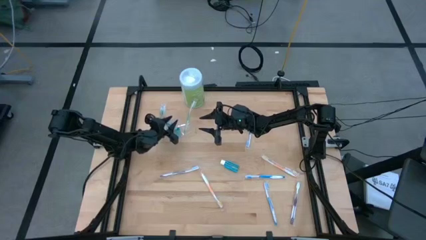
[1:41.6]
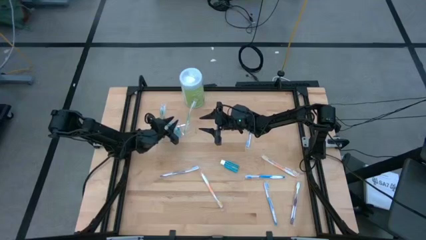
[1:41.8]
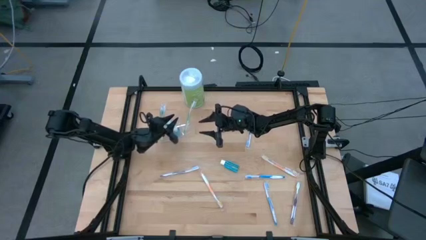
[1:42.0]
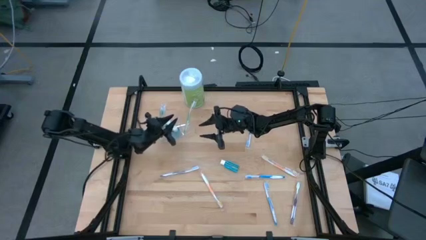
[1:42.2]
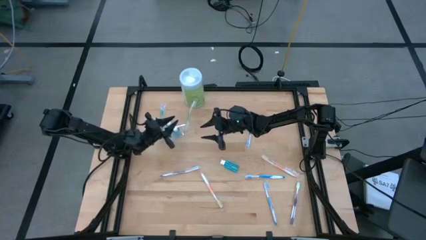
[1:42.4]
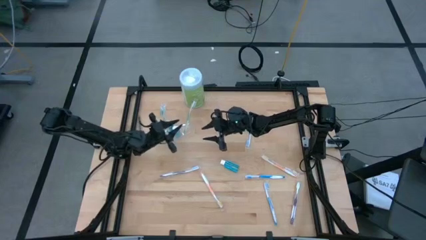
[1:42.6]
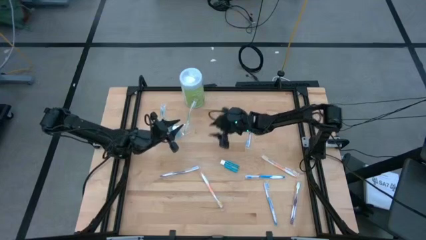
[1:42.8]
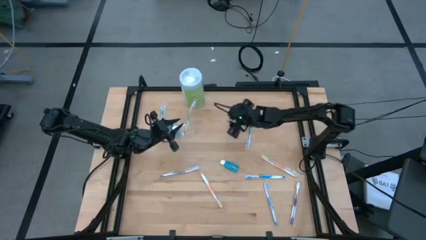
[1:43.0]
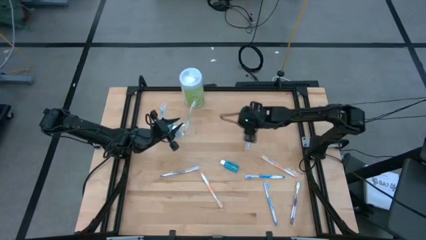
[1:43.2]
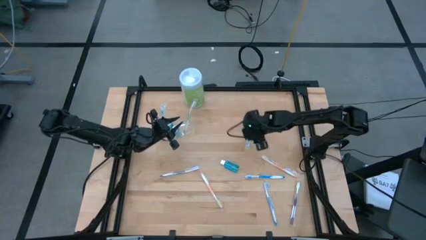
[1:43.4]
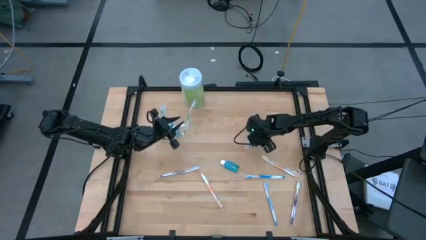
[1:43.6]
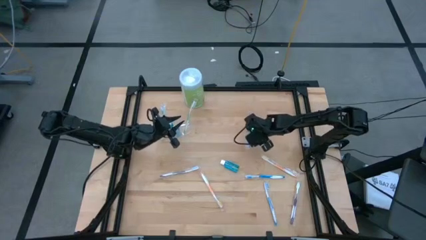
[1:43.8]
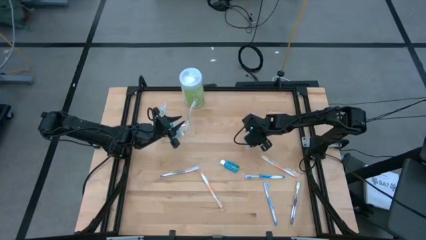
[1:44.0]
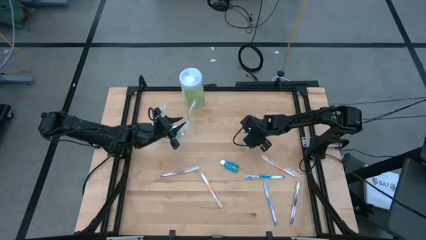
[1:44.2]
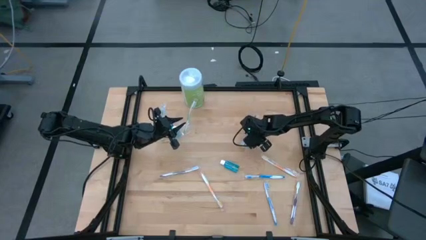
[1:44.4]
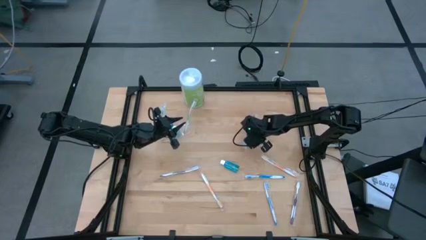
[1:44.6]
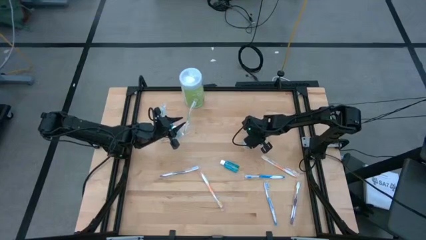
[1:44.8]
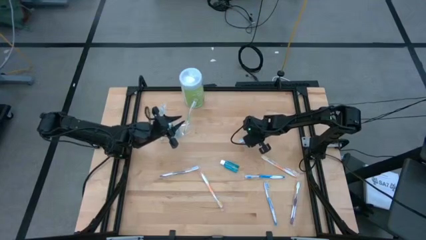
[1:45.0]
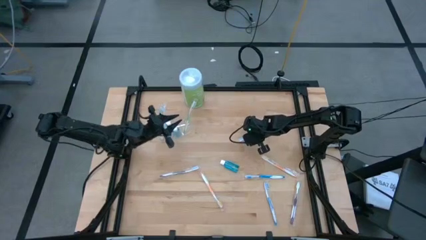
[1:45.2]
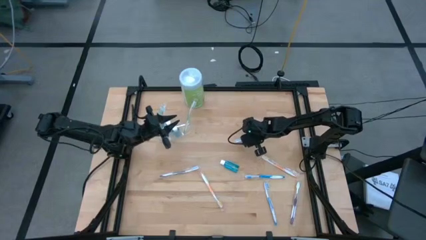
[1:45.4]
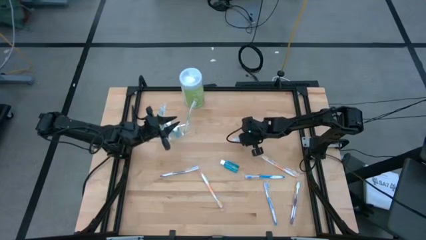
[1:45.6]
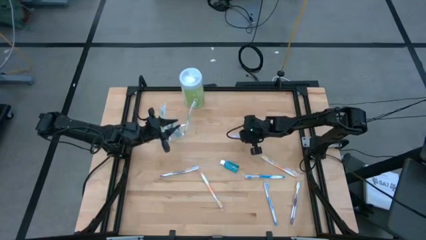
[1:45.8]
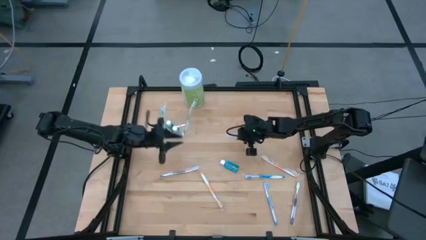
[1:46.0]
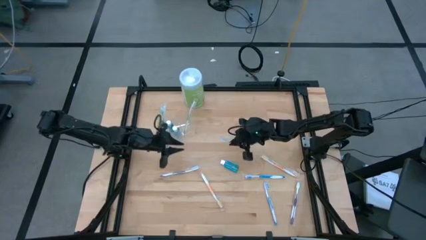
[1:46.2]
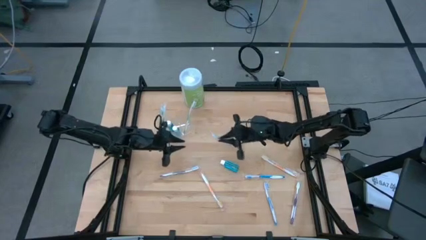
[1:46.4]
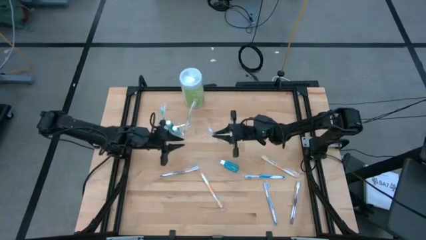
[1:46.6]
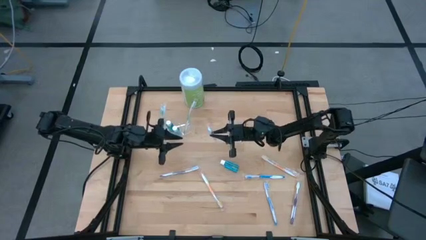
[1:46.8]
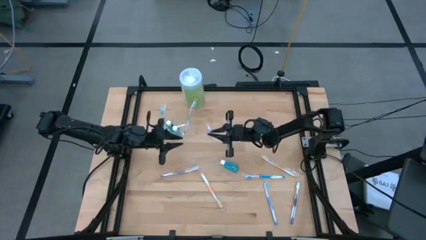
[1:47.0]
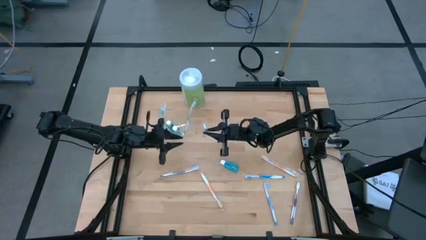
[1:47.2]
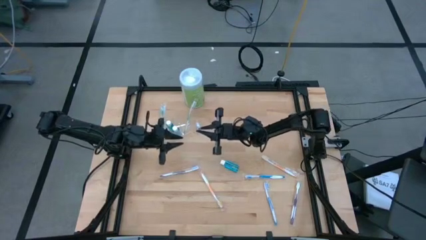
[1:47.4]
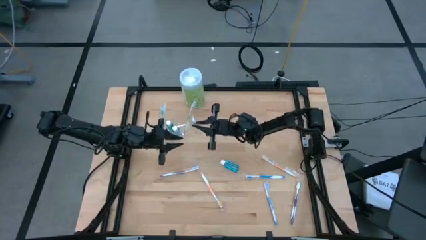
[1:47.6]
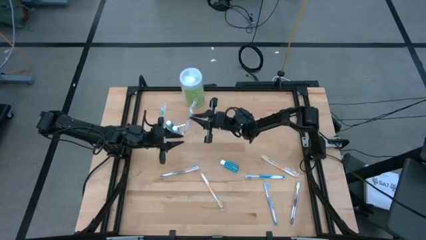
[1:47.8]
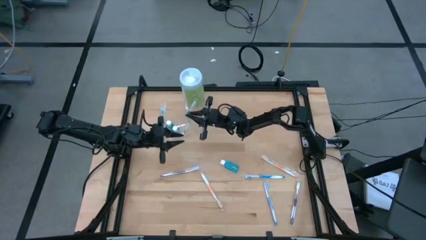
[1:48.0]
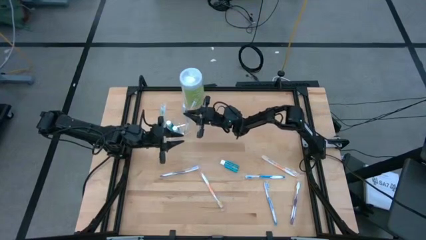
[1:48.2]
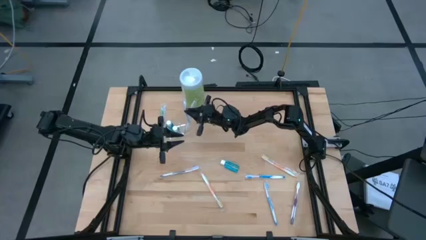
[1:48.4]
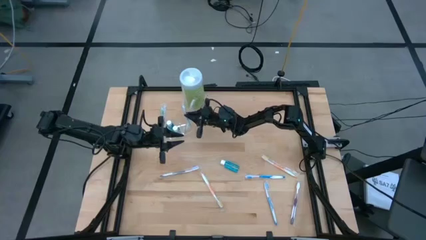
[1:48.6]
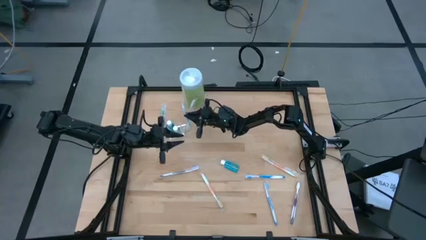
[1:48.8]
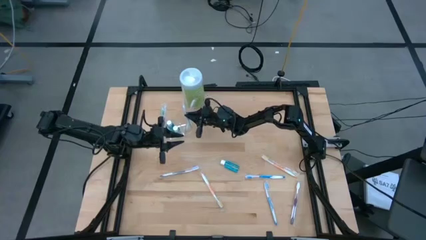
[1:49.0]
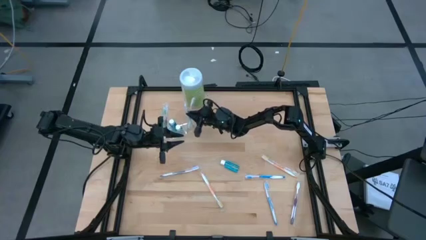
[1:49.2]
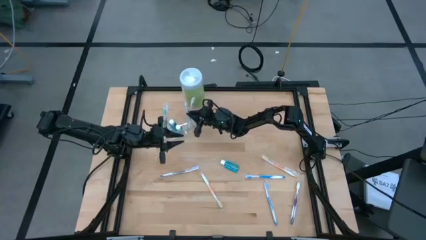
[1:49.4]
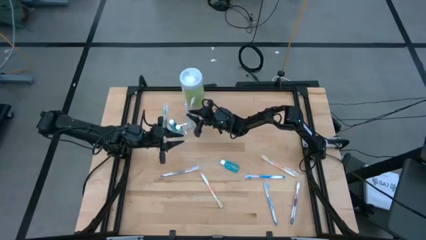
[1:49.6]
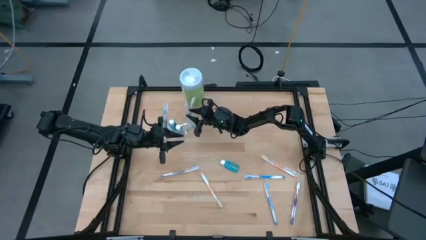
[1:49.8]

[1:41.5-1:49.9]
Task: Pick & Place toothbrushing station
Put the top blue toothbrush into the transparent organizer

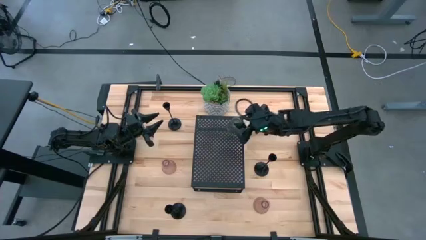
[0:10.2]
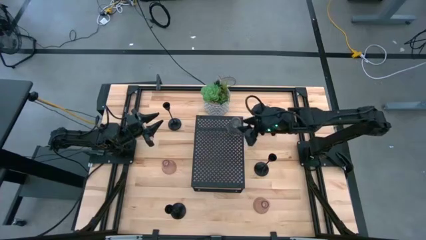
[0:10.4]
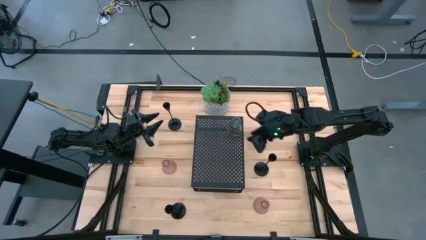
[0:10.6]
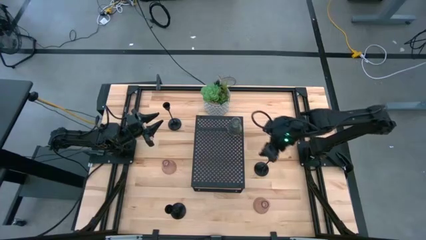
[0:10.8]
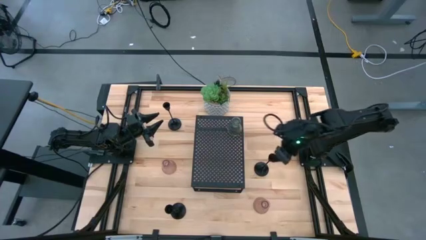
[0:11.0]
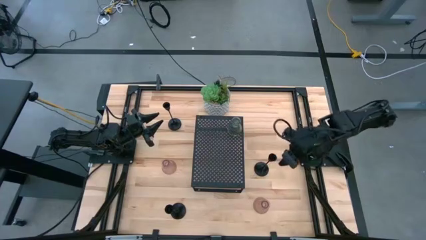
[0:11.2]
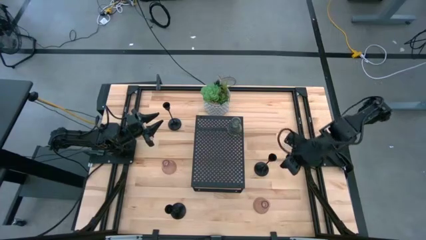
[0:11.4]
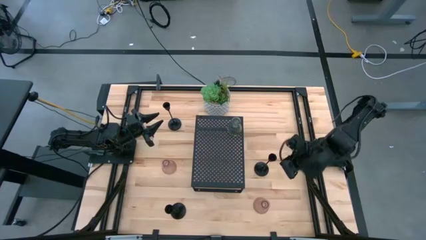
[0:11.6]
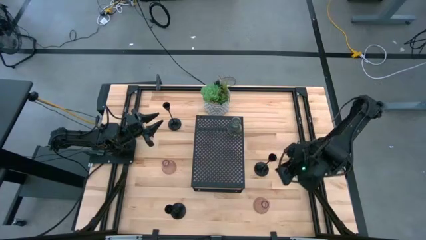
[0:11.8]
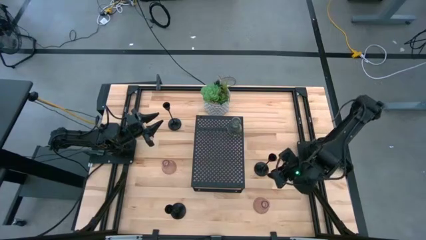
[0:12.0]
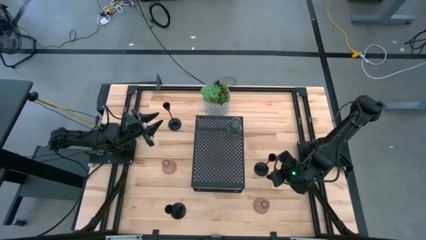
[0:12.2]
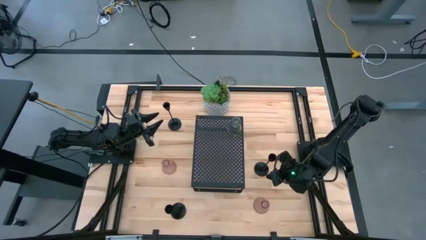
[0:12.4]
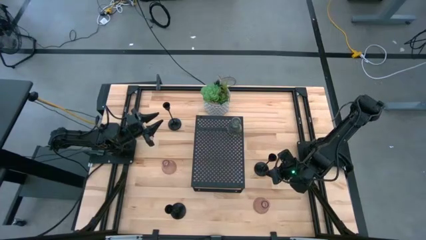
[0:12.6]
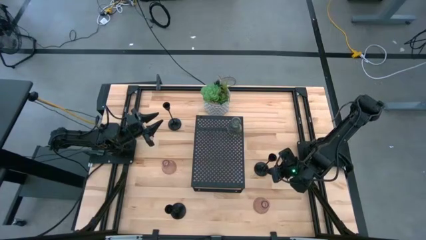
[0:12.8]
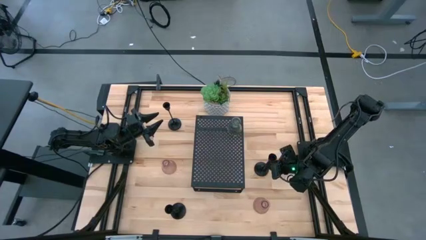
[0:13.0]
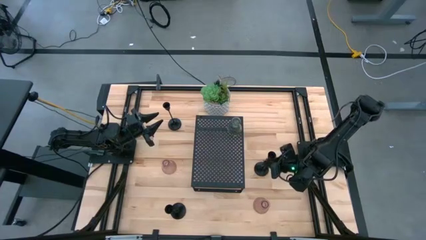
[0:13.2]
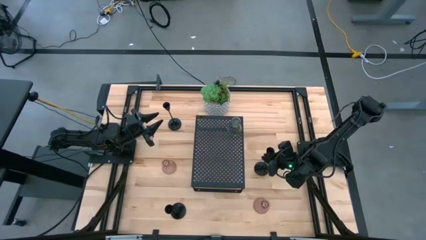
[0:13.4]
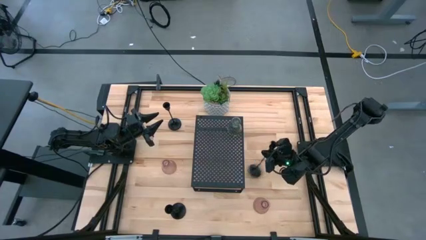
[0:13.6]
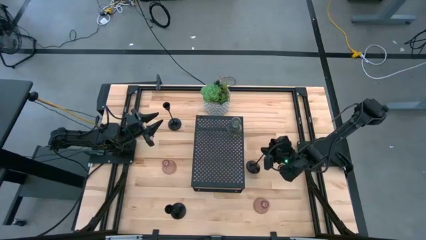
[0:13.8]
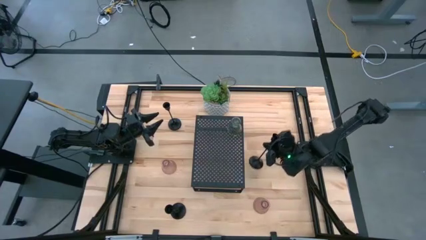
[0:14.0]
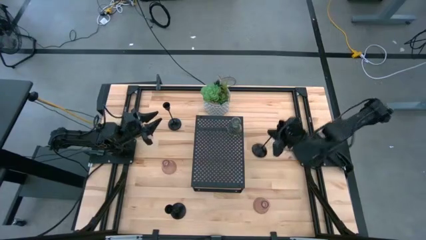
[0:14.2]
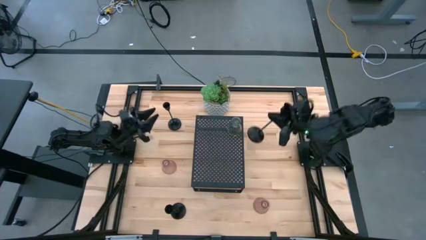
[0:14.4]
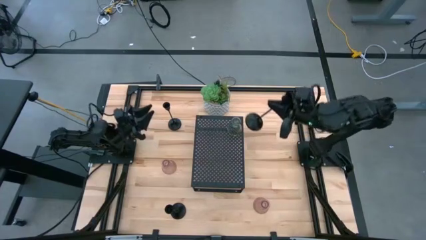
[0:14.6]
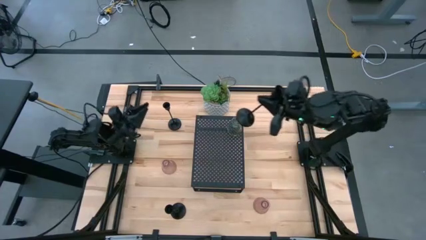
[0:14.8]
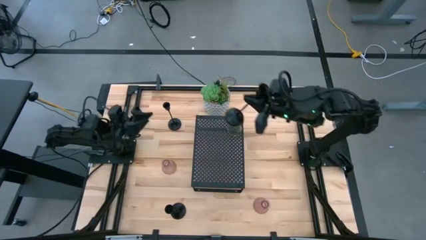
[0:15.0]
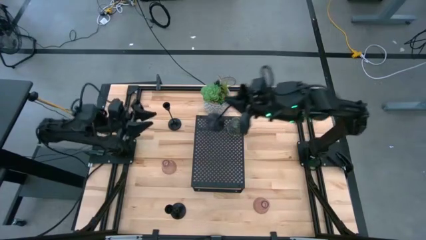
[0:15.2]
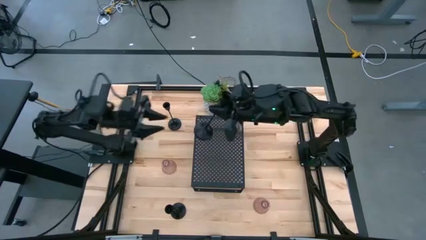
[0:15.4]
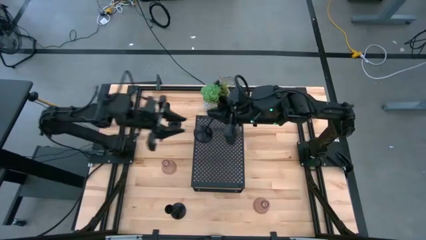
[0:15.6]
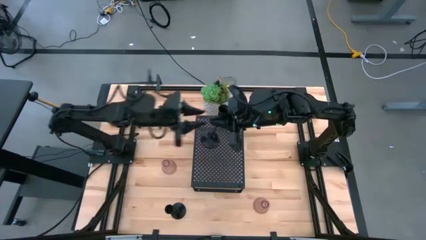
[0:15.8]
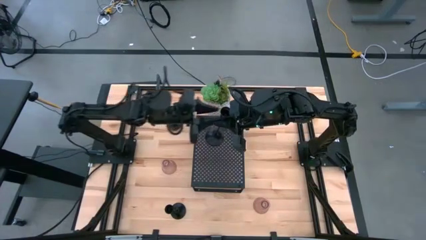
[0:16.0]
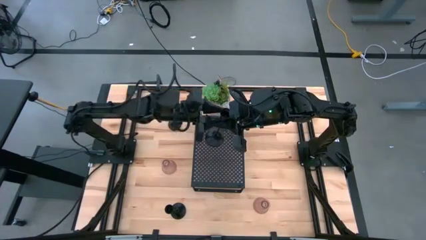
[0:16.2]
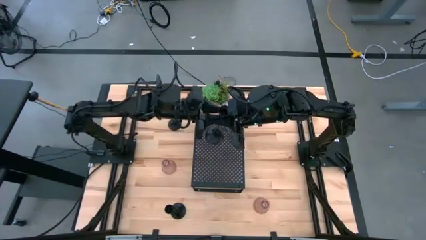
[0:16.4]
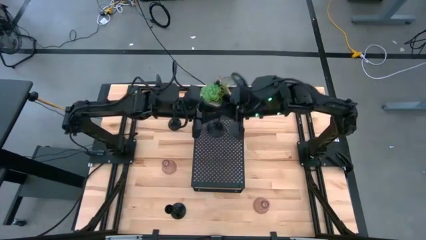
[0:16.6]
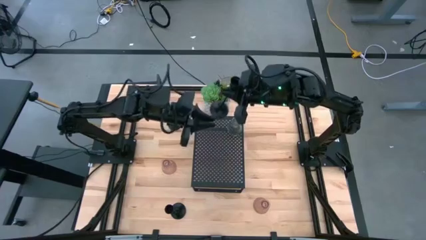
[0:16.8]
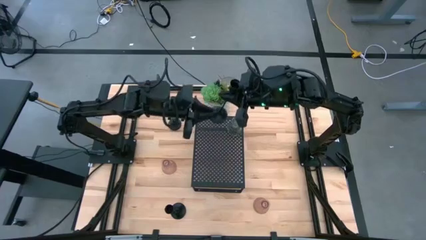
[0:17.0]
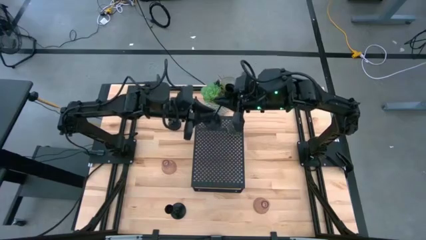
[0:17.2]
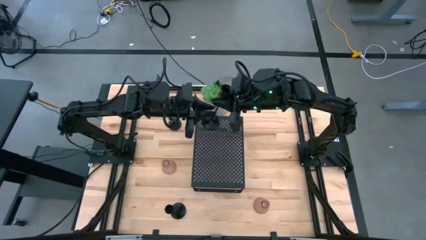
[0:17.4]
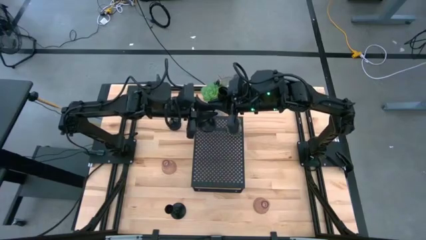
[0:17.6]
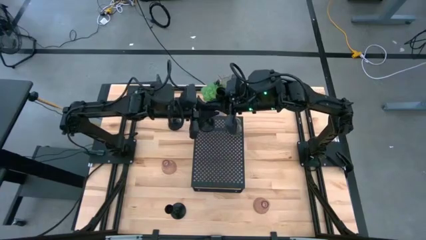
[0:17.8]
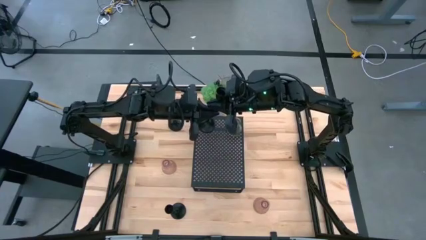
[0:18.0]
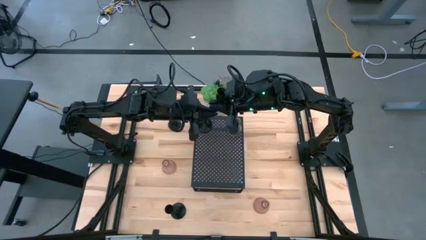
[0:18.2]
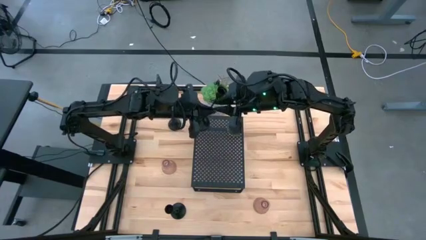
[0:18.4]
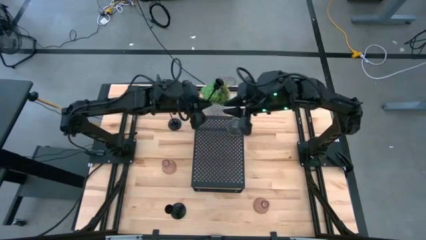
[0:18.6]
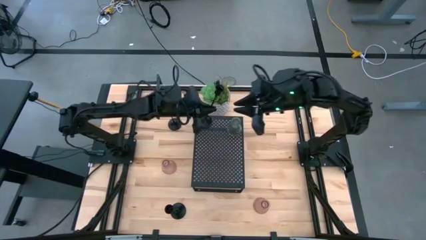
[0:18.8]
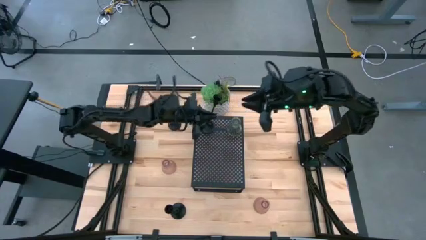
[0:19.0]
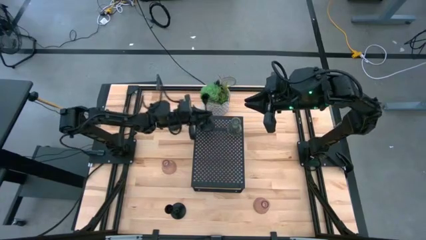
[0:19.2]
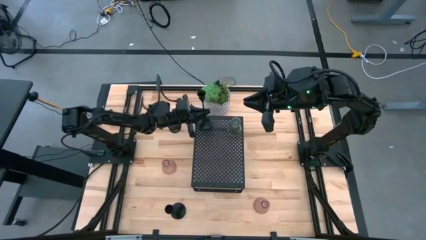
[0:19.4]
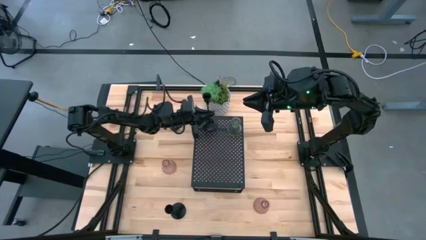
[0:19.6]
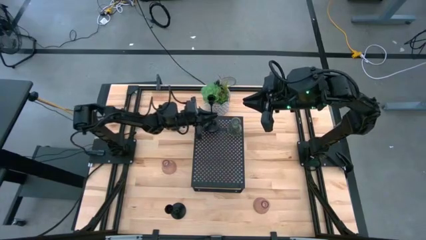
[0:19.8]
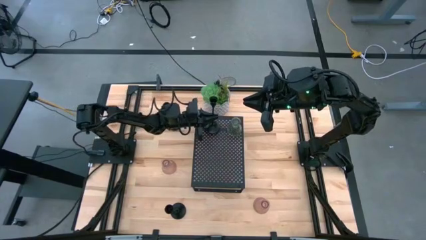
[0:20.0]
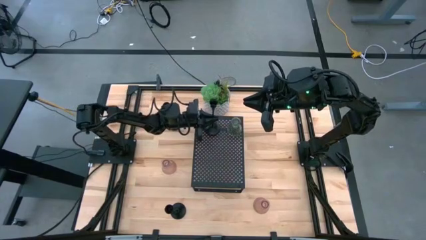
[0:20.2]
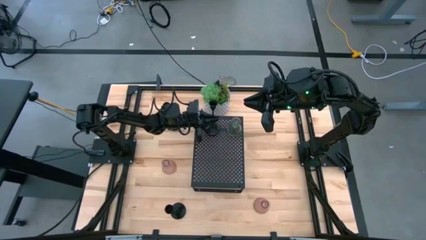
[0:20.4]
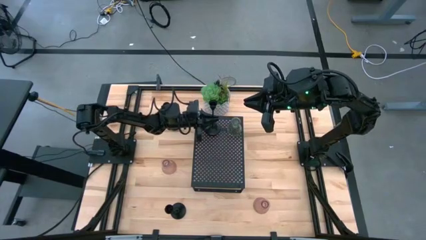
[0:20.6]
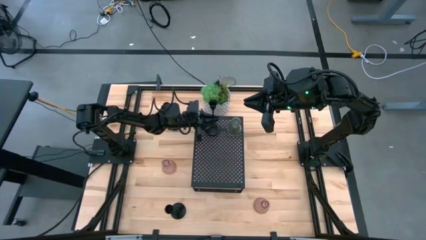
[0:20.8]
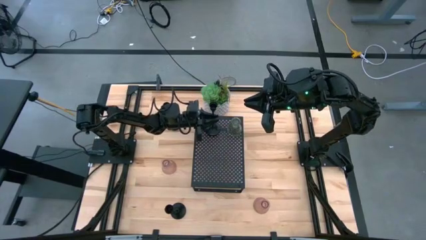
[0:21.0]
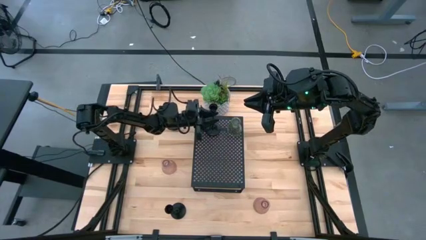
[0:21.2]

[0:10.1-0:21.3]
Task: Pick & Place candle stick holders
Put the black candle holder in the middle on the shelf
